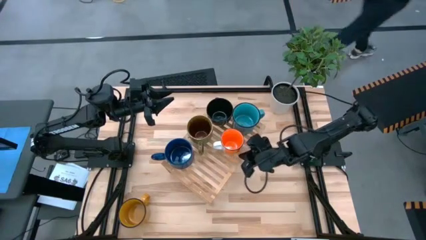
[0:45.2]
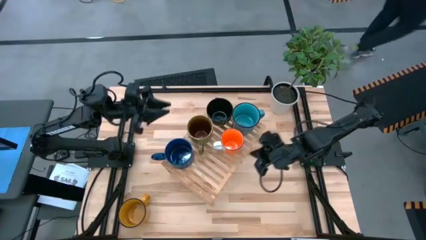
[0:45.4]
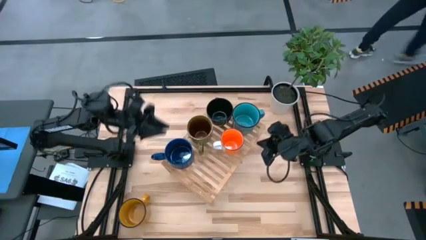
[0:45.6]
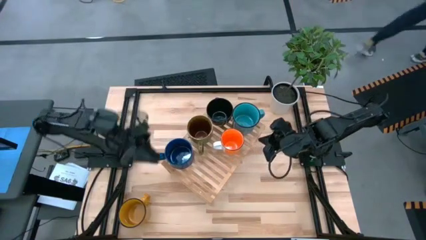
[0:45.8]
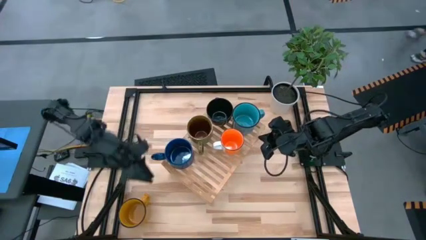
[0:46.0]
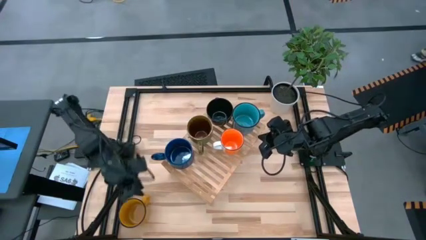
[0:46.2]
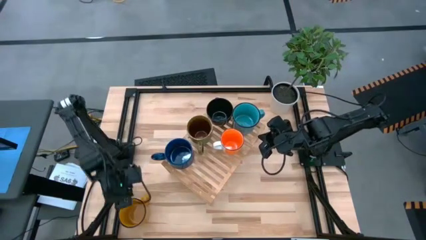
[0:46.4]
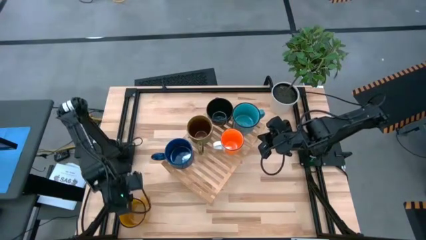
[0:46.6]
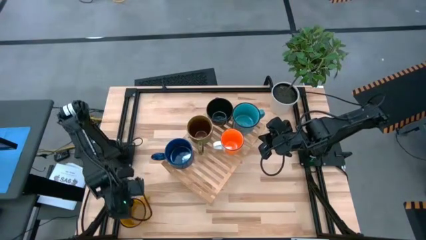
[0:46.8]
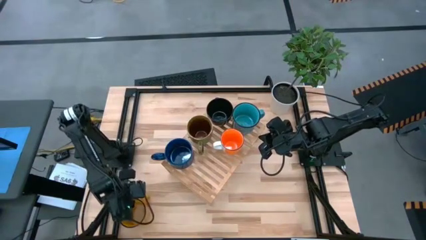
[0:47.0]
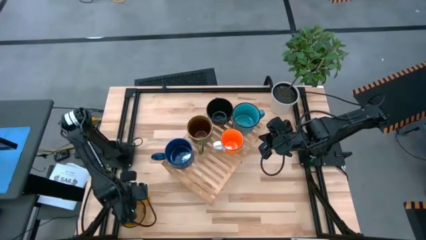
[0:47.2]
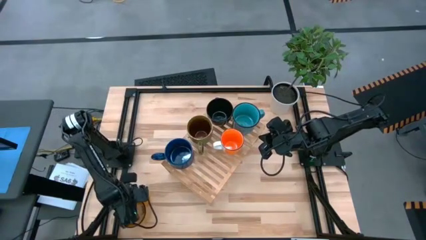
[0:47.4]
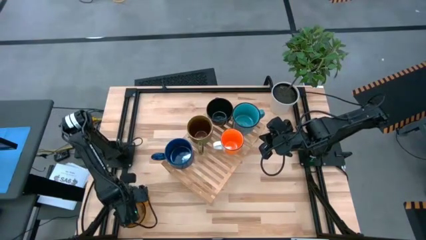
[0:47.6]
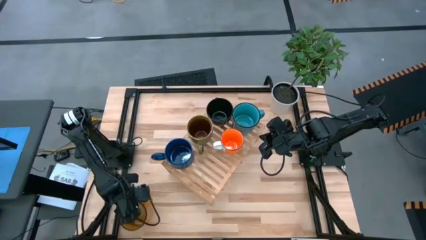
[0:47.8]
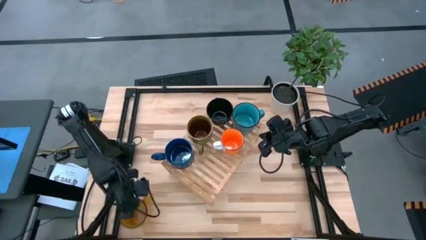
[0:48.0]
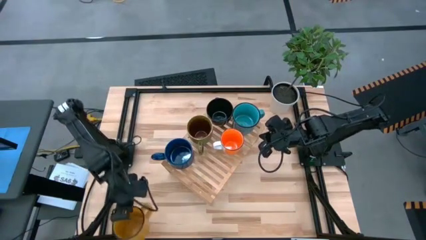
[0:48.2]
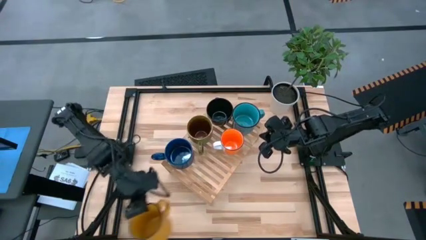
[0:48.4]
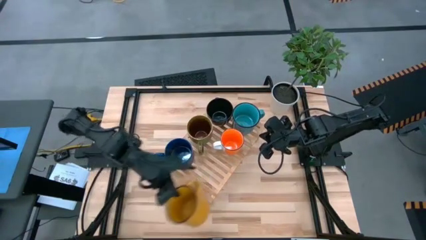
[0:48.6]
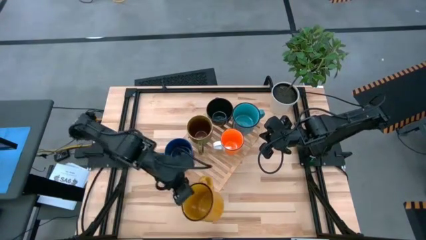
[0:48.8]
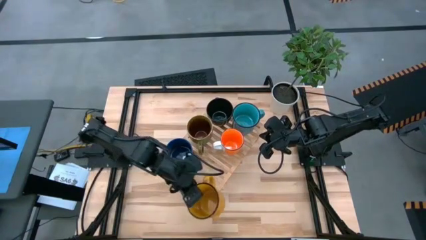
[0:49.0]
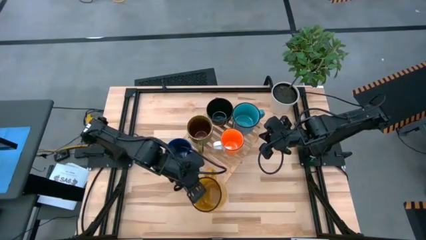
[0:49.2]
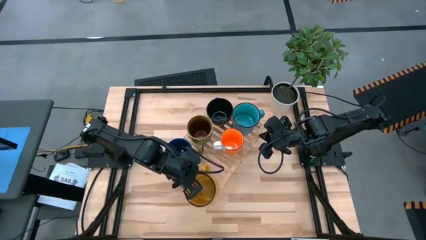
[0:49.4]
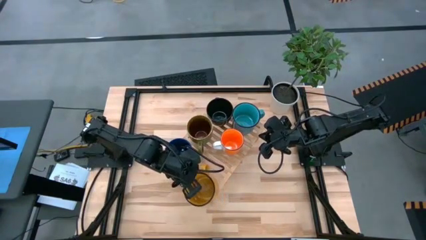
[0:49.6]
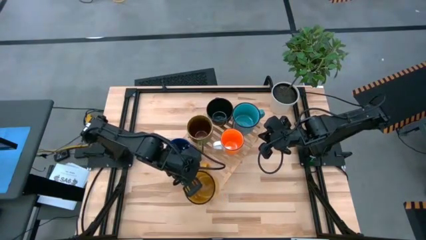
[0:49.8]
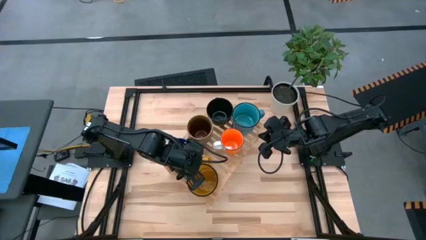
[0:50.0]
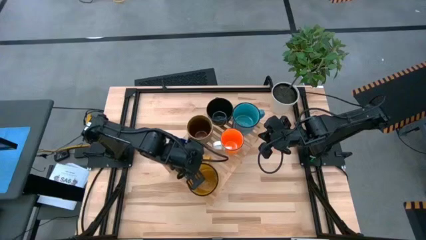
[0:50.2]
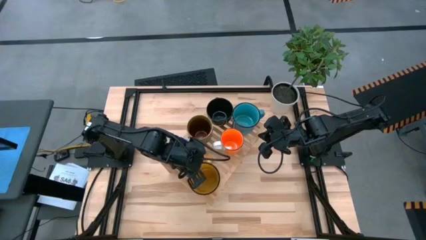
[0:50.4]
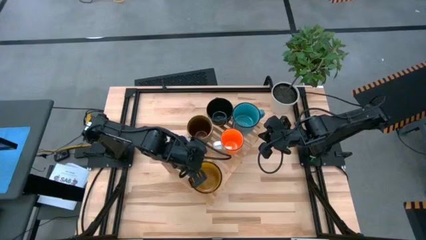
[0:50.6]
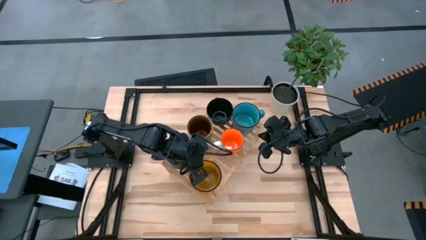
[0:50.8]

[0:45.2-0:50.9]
Task: Place coffee mugs
Put the yellow mug on the shelf

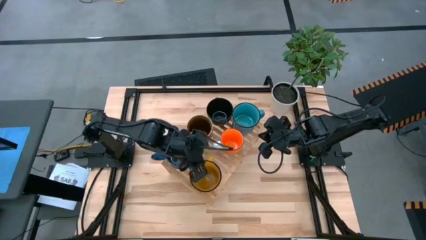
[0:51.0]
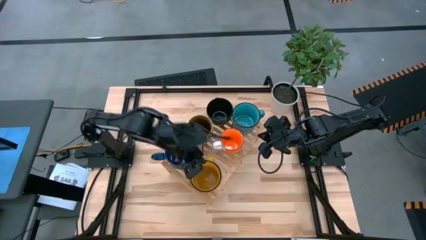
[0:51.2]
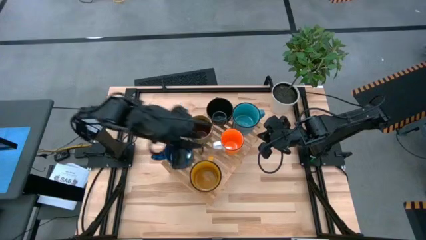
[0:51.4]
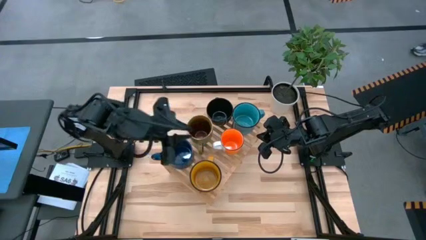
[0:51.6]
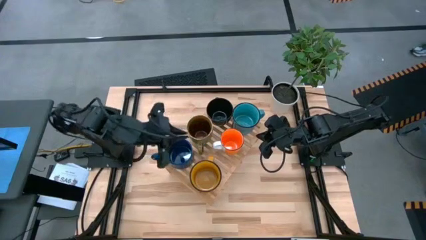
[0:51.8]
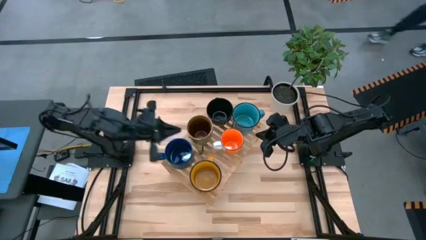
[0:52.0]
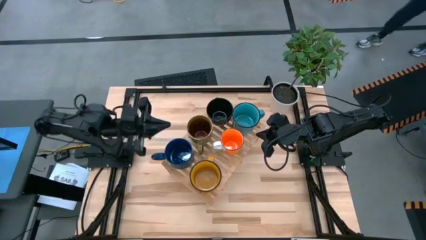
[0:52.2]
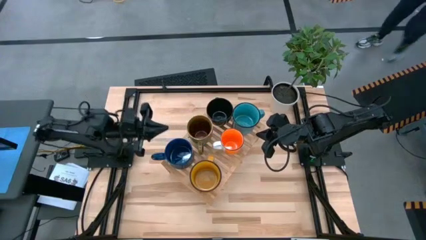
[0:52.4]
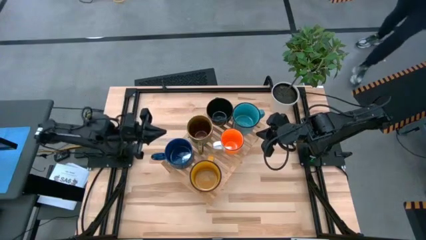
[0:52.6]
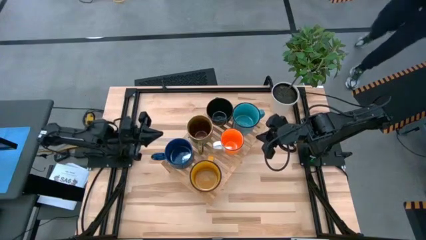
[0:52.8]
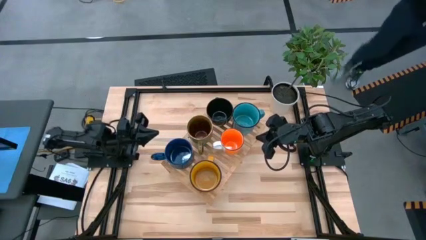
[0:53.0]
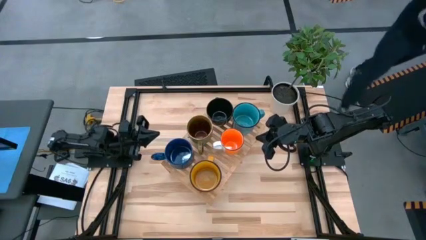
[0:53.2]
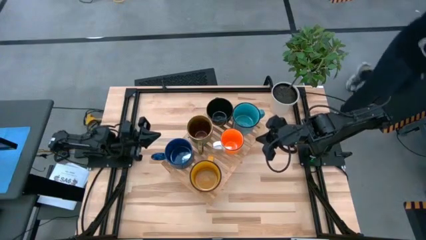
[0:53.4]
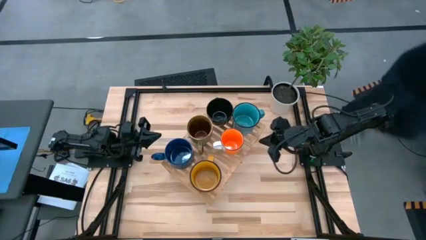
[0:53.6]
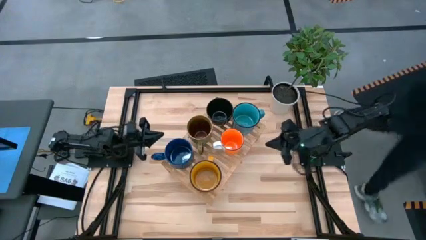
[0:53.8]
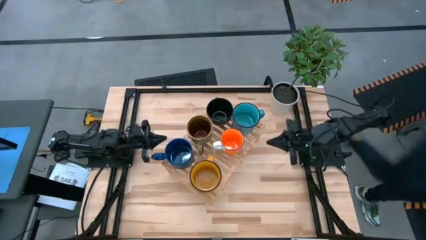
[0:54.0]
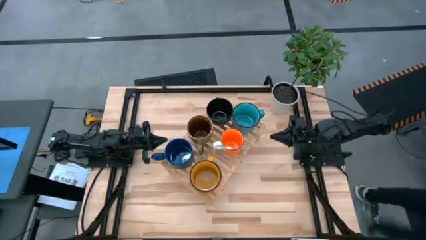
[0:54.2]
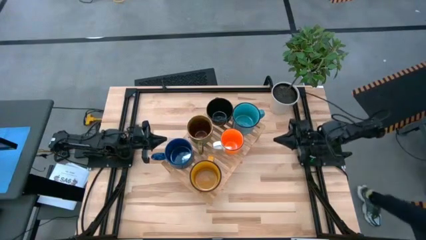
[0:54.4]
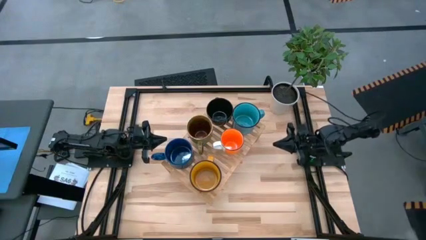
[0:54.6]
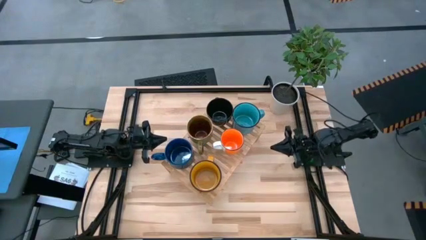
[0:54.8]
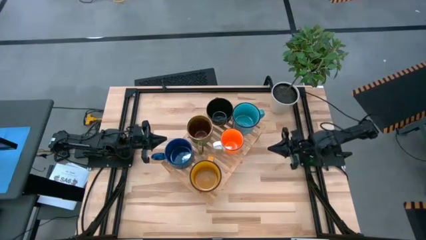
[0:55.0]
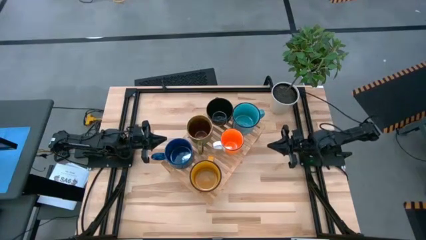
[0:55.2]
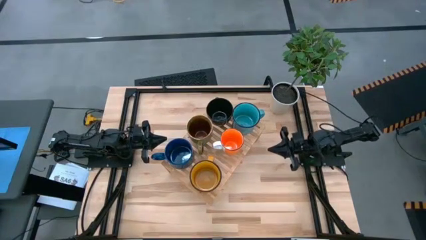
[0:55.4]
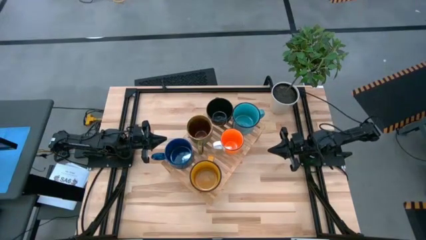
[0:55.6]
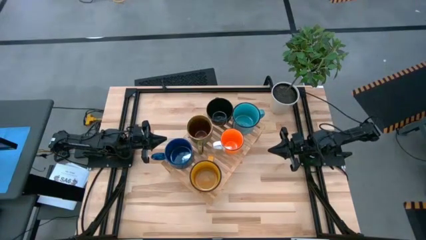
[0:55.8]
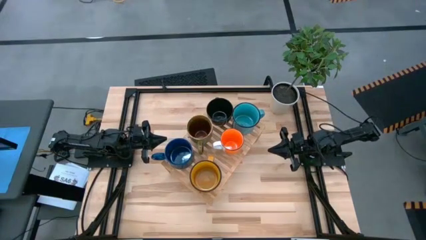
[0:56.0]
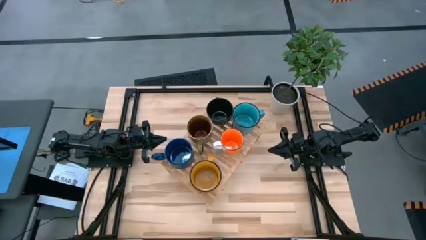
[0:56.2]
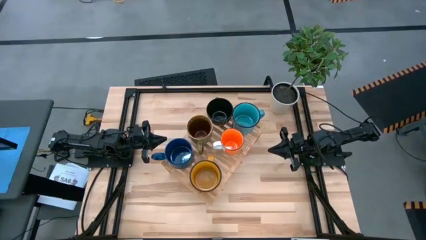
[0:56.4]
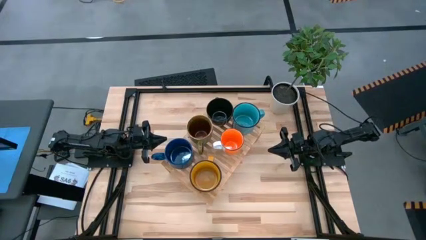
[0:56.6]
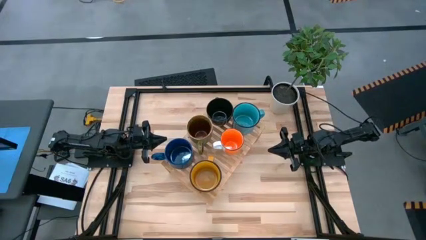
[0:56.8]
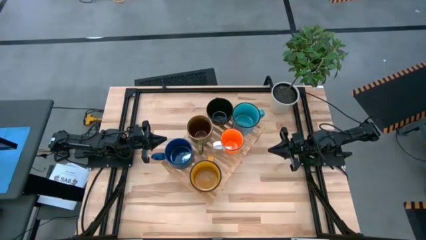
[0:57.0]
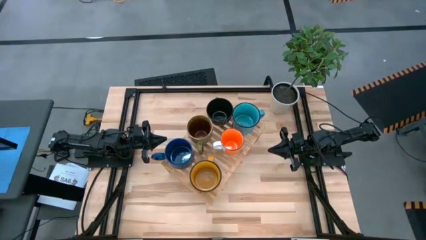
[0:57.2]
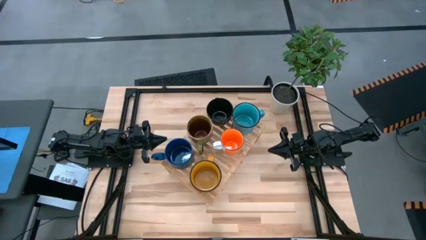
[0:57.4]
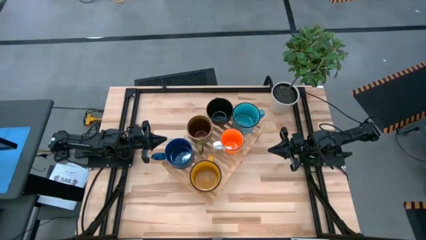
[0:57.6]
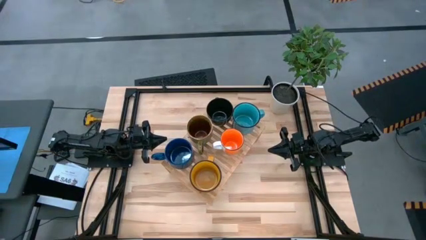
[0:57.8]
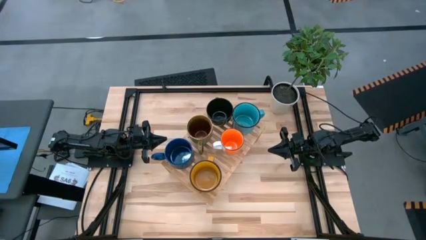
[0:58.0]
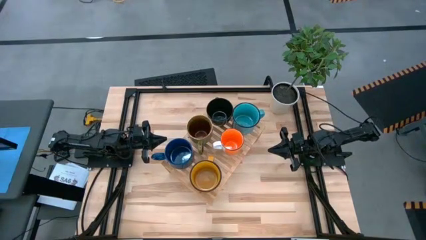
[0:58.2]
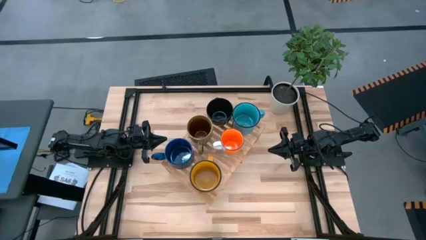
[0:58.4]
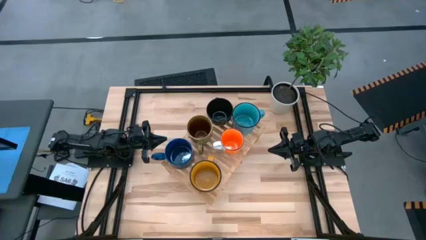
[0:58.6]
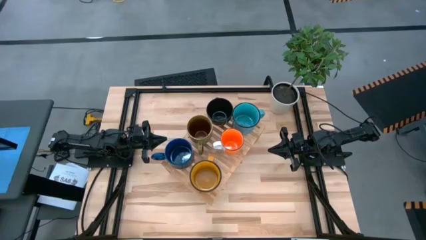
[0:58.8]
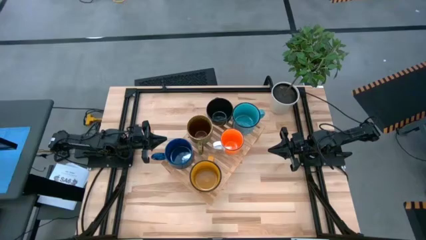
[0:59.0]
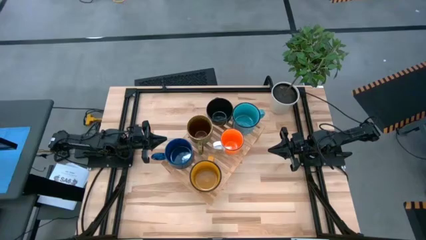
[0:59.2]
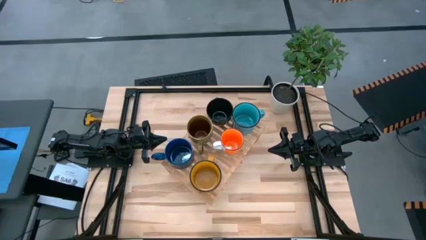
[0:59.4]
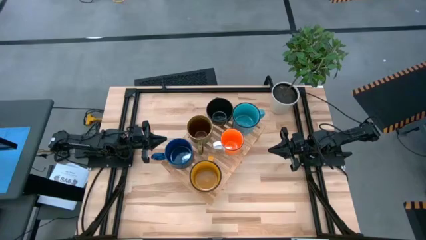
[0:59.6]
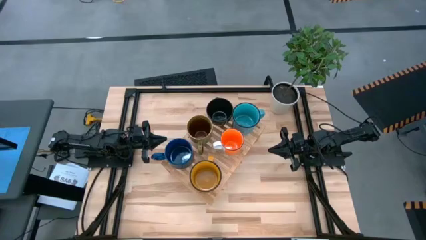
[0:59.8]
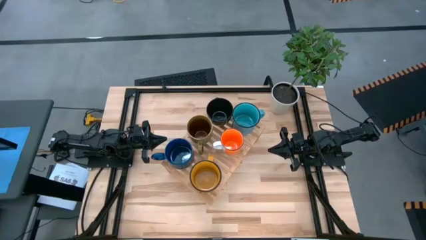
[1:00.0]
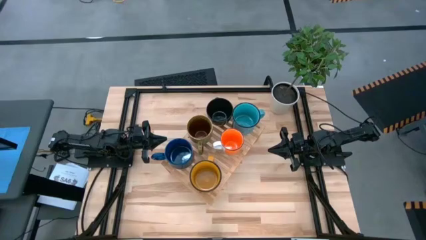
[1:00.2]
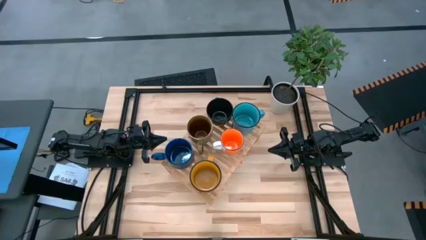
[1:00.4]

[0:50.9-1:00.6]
Return to Home Position
